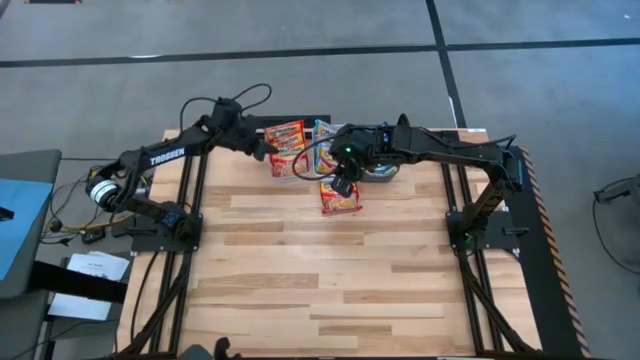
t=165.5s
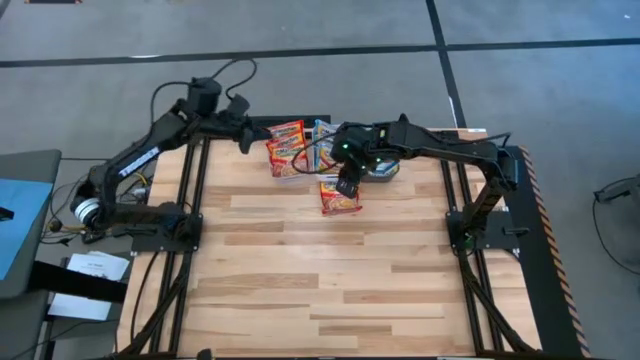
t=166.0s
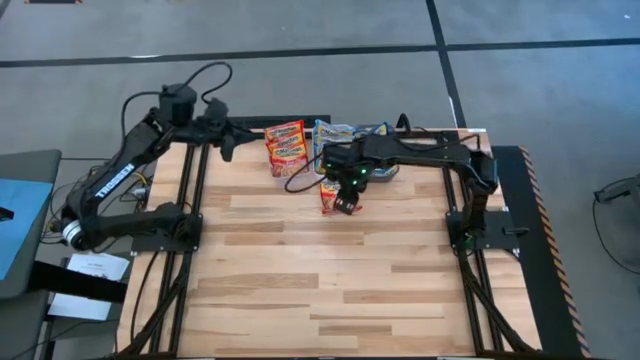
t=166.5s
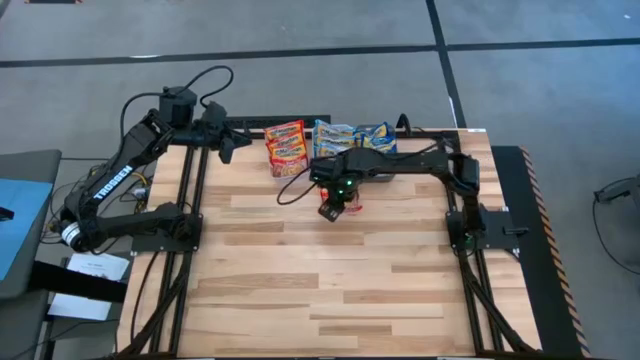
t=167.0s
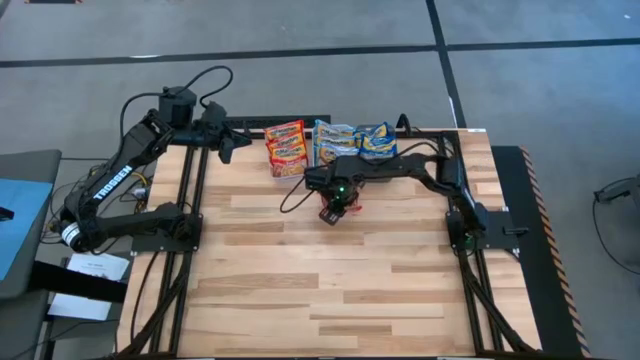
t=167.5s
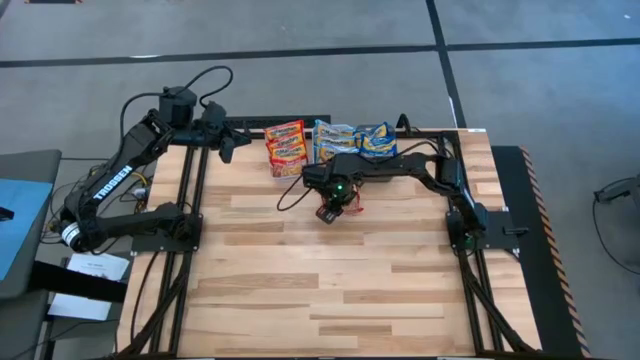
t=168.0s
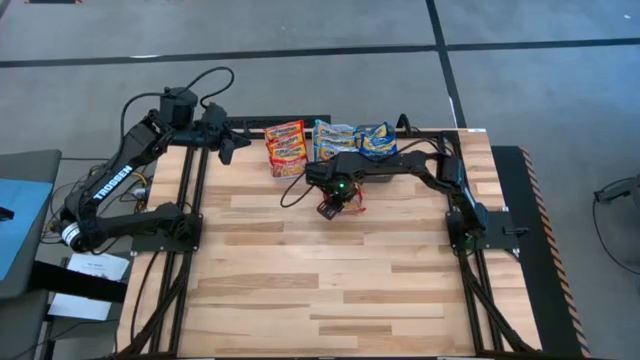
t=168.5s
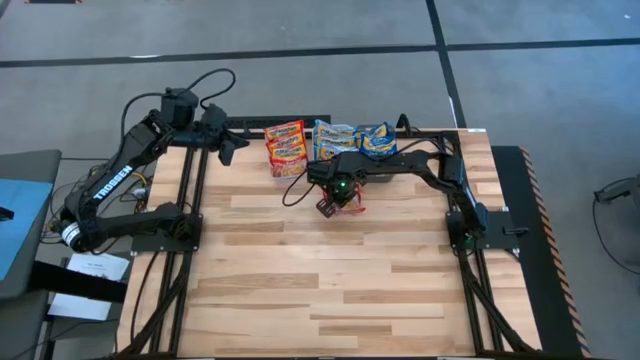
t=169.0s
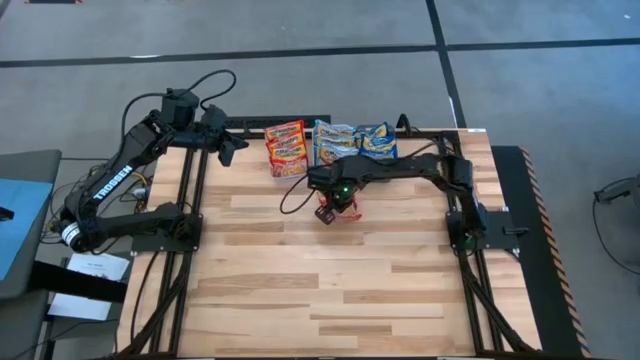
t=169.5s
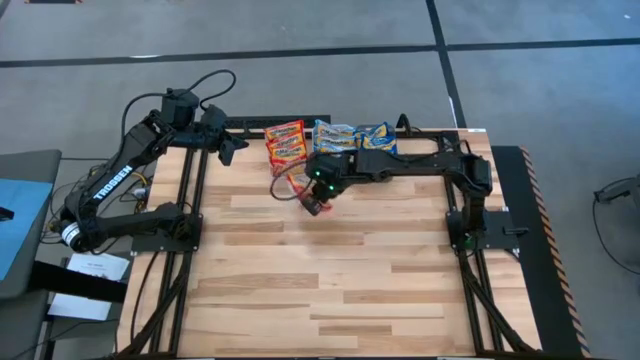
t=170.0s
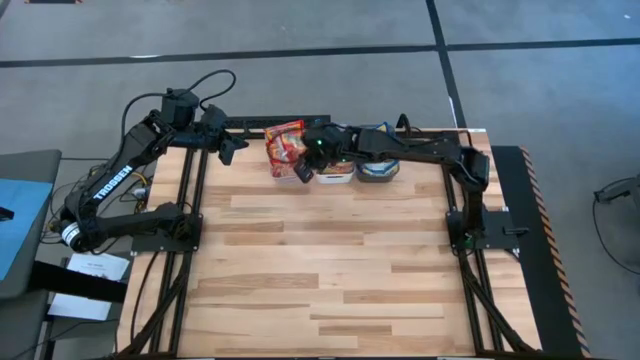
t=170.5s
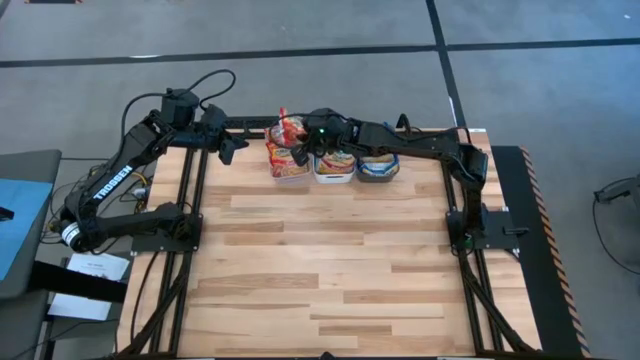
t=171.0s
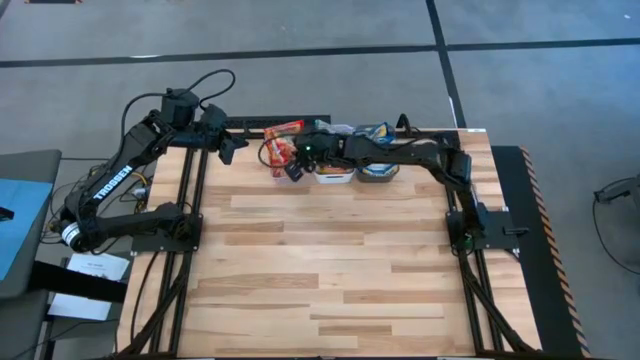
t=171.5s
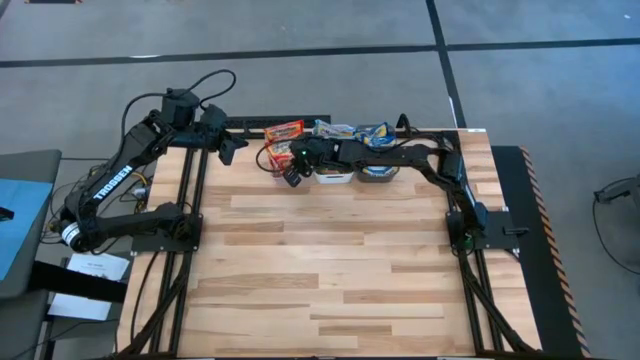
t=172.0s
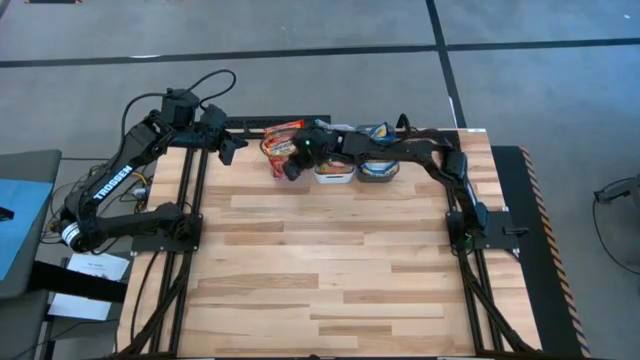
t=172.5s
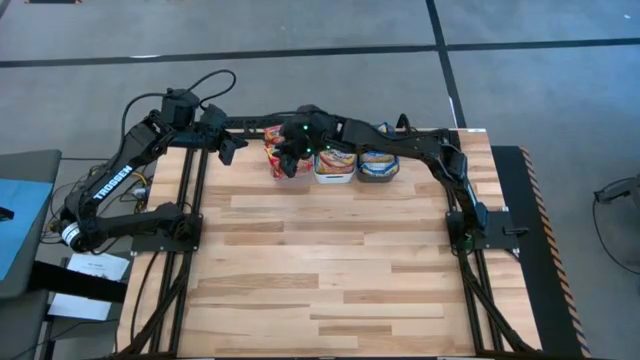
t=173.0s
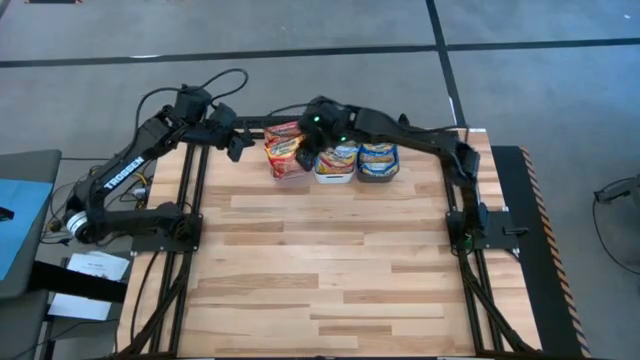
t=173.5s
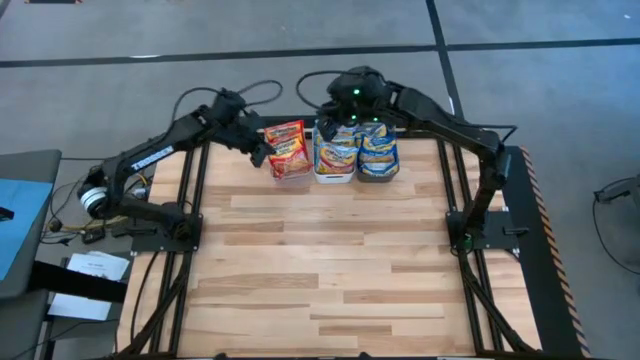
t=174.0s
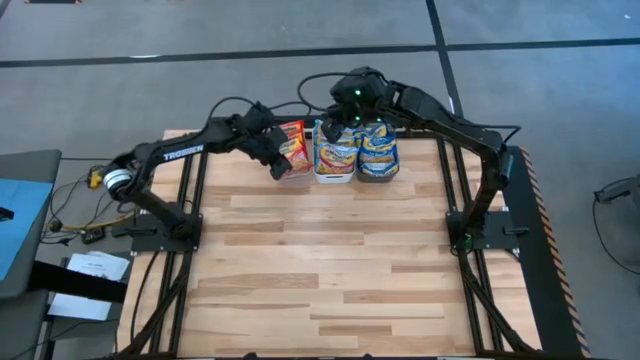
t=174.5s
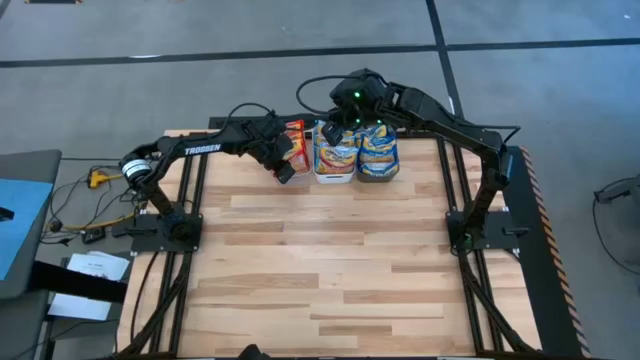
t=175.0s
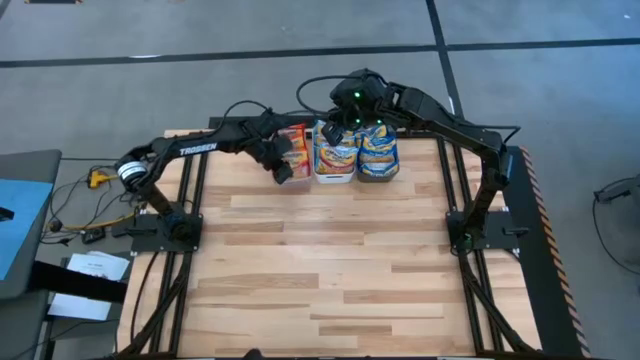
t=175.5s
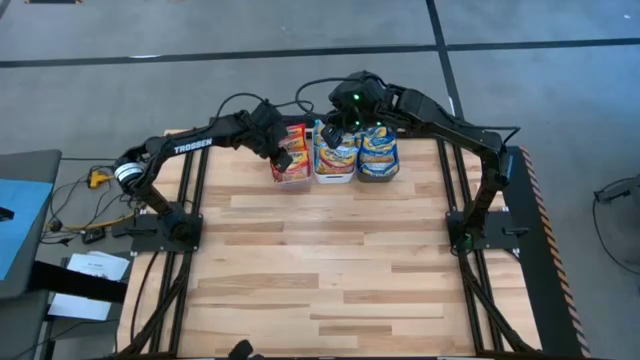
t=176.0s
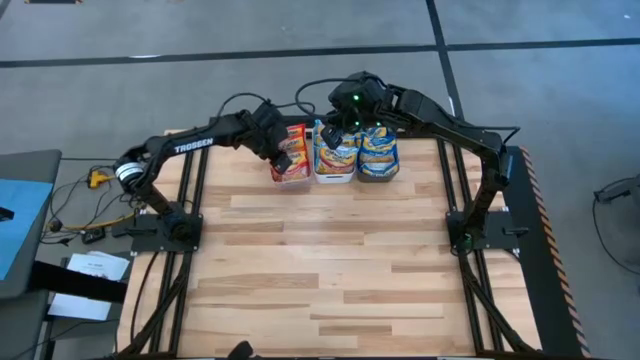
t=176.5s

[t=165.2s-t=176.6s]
Task: Sort Maruchan noodles
Put the red noodle pack into the transparent bin

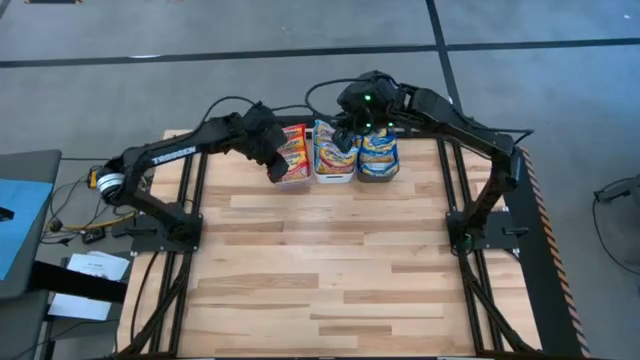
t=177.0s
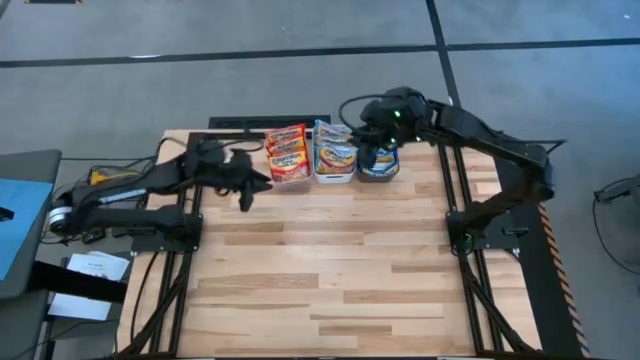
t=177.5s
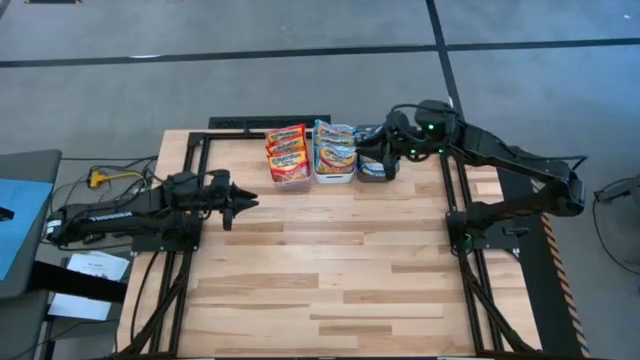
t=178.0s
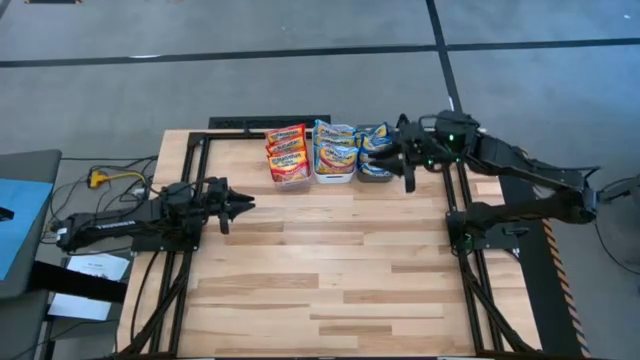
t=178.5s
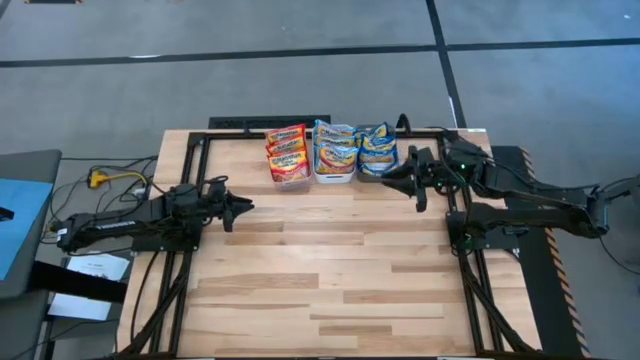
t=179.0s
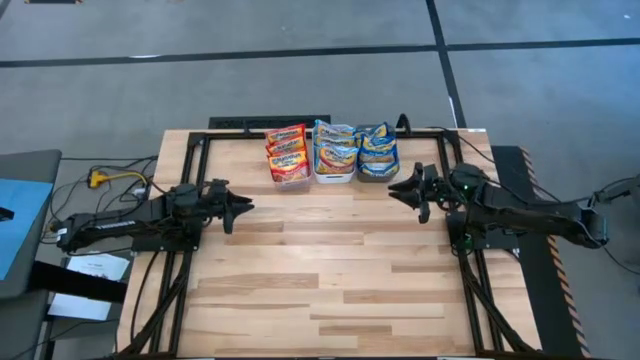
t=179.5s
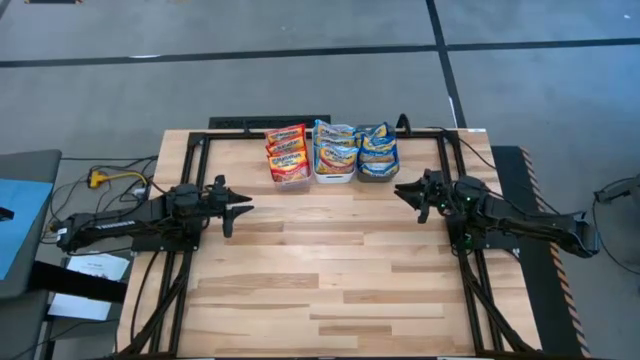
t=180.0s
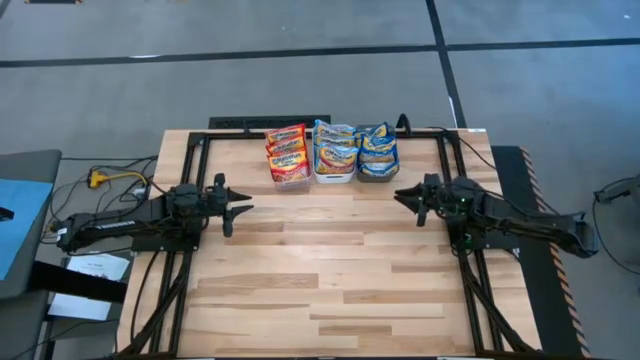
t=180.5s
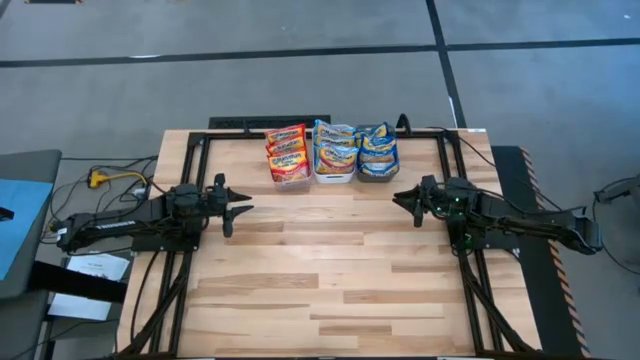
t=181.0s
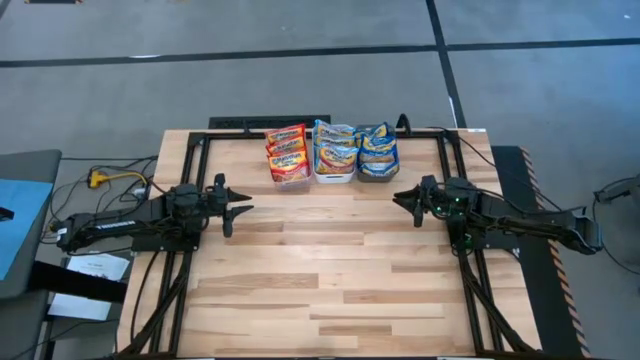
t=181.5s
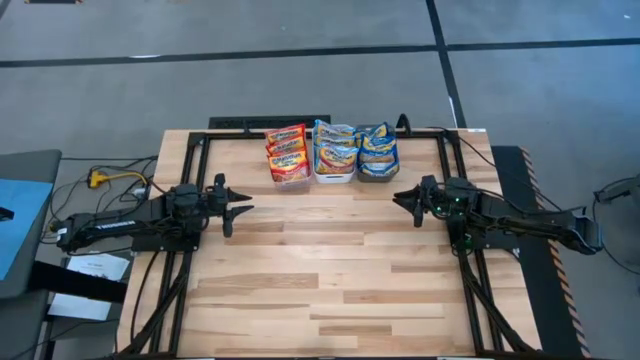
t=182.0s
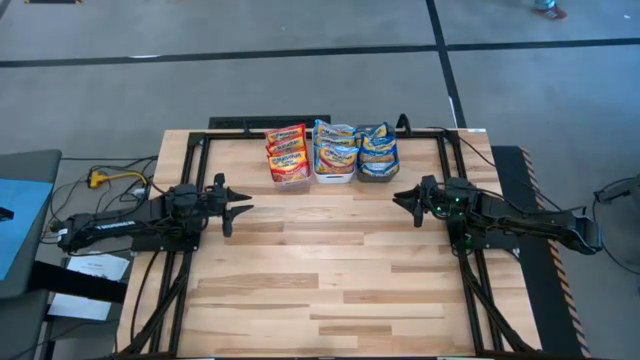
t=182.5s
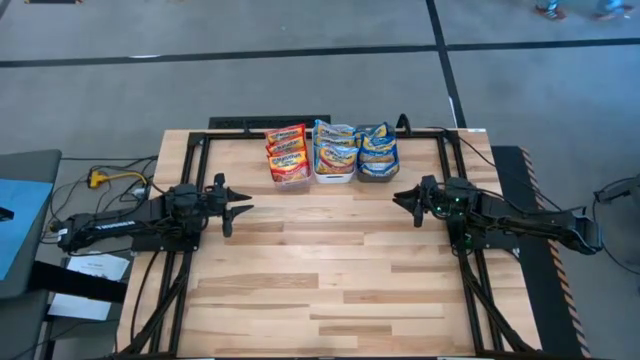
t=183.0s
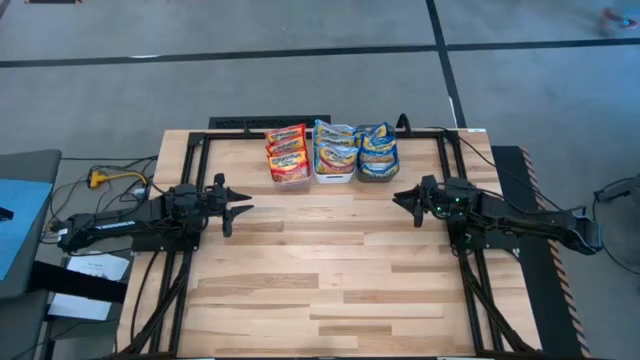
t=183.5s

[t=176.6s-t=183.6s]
Return to Home Position

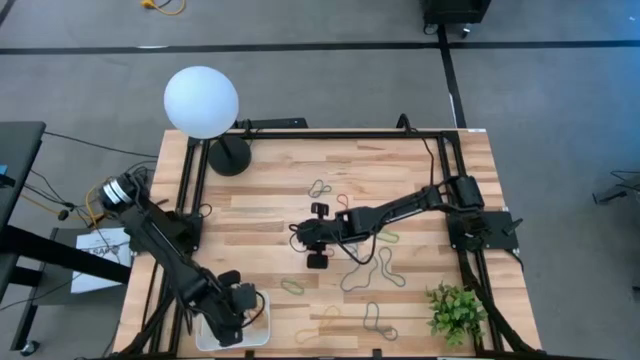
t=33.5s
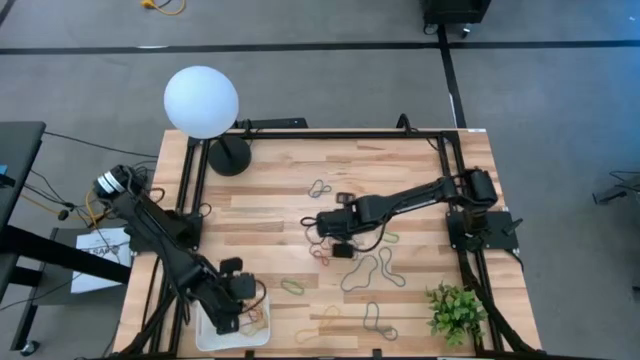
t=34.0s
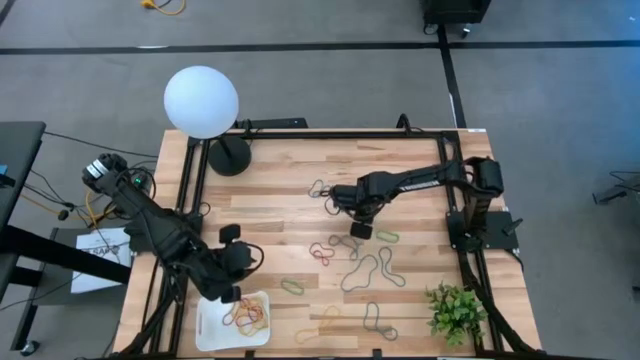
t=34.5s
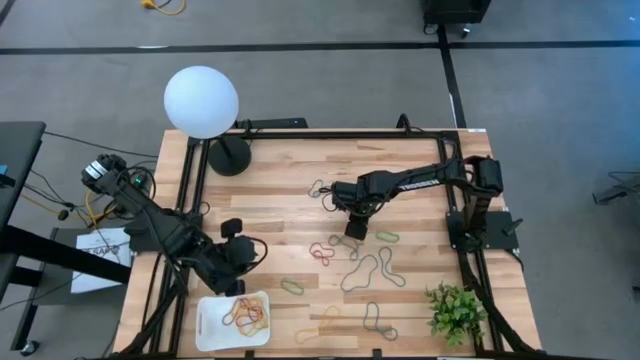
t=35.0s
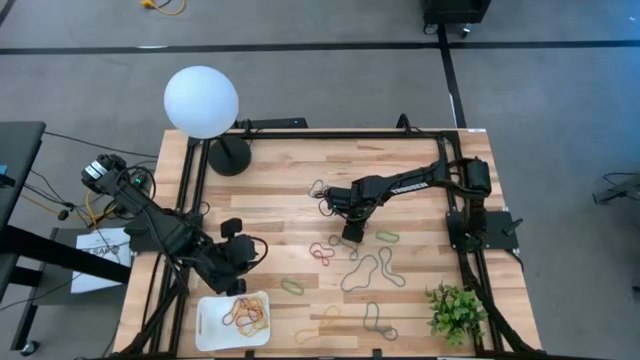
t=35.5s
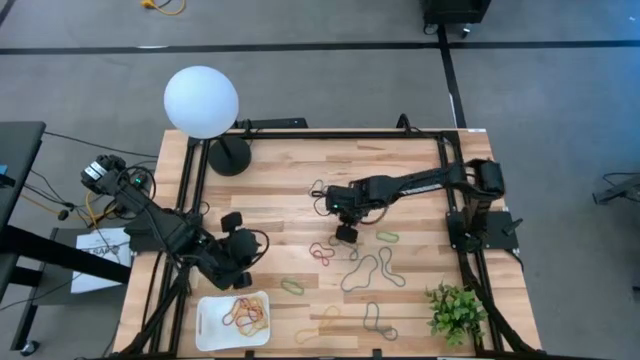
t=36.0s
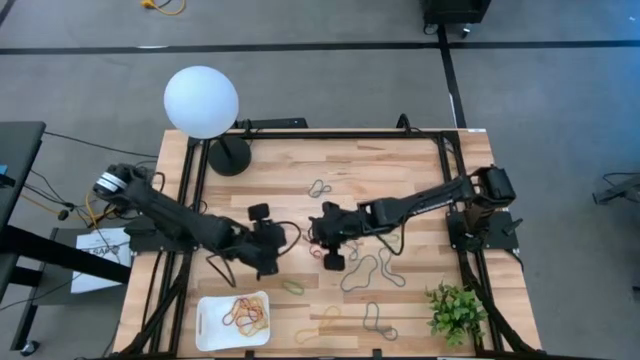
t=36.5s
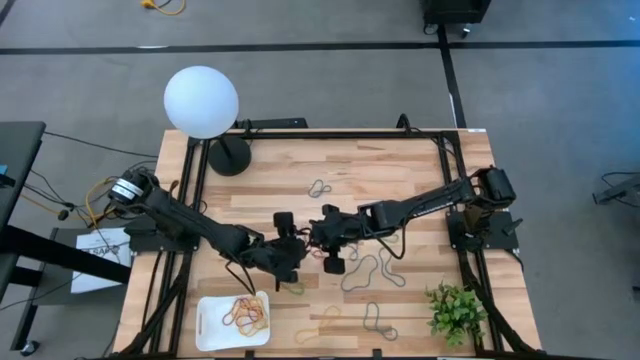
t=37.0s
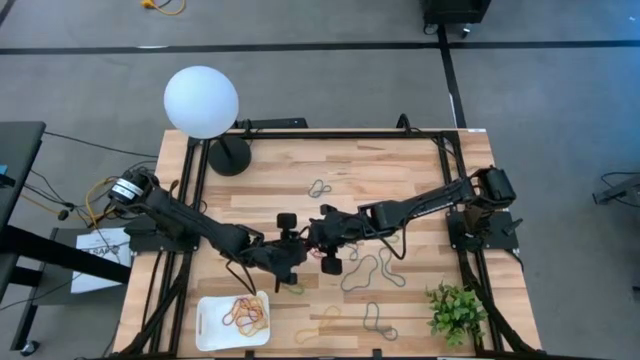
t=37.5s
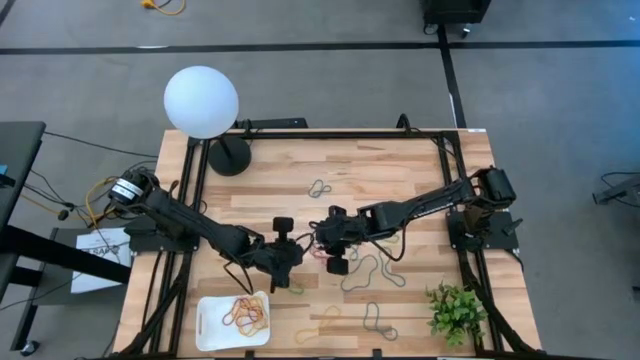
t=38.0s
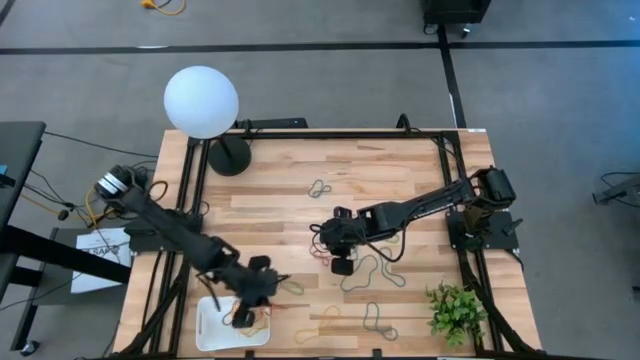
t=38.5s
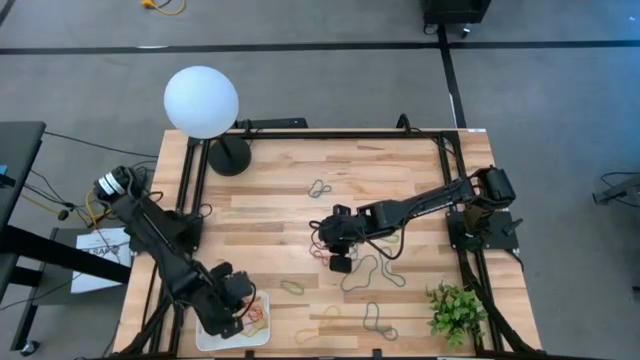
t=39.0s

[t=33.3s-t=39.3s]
Task: Pick and place items into bin
Put the red rubber band into the bin
